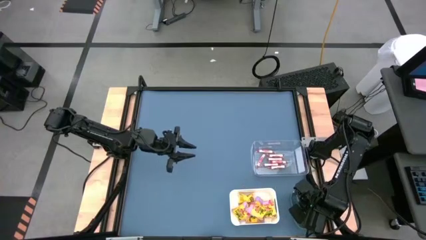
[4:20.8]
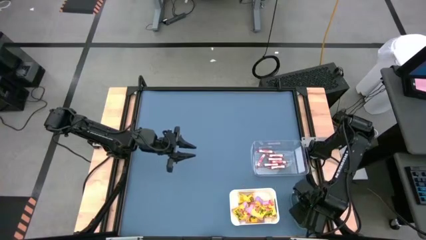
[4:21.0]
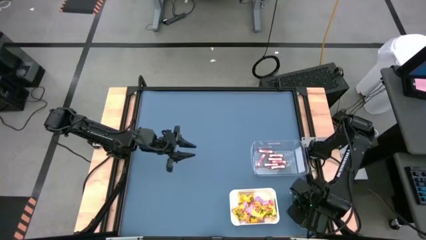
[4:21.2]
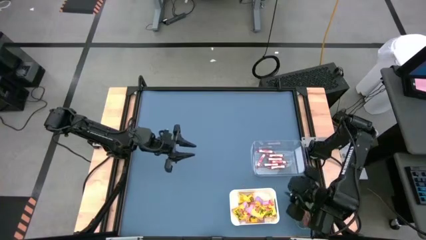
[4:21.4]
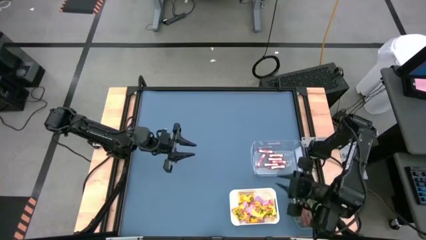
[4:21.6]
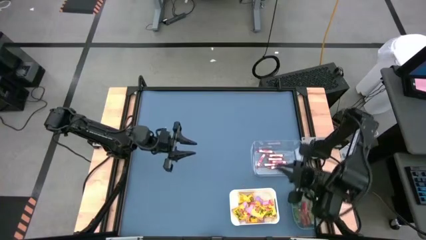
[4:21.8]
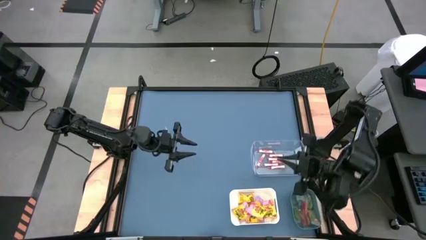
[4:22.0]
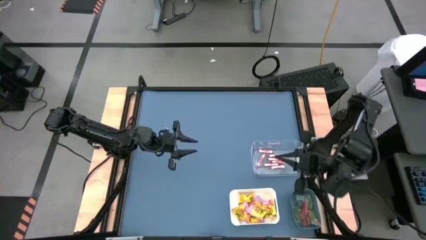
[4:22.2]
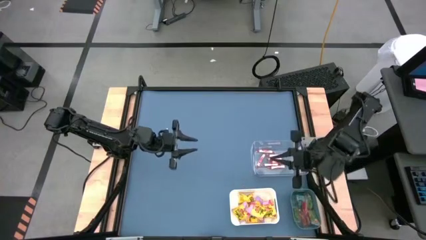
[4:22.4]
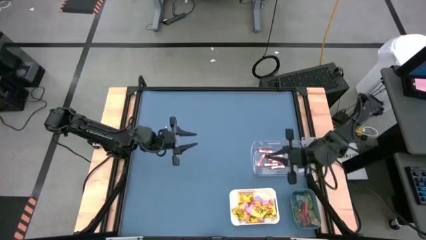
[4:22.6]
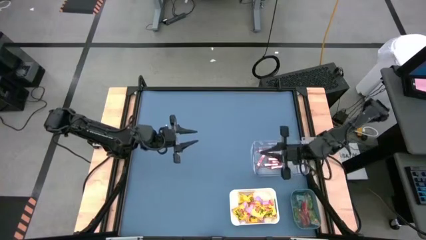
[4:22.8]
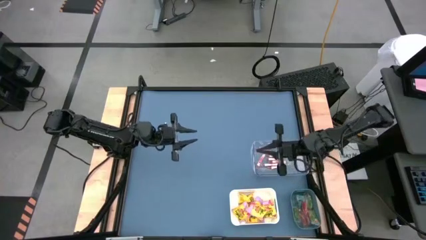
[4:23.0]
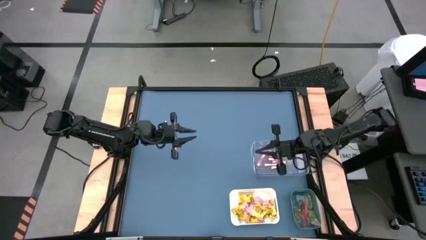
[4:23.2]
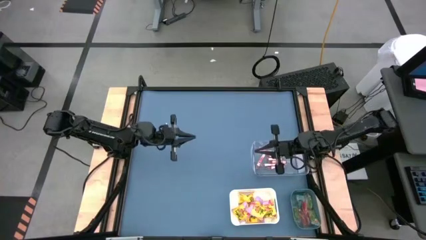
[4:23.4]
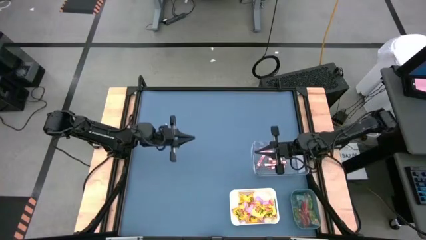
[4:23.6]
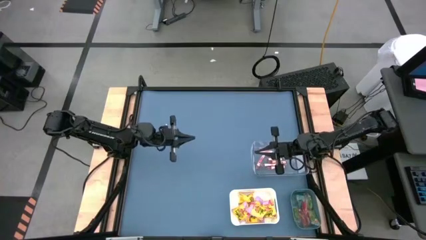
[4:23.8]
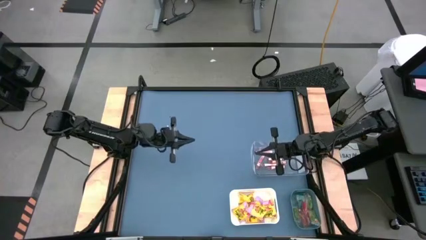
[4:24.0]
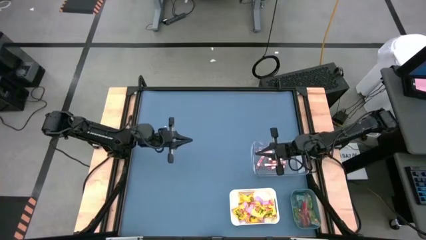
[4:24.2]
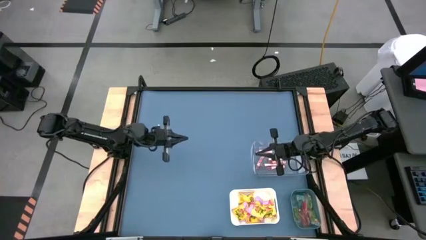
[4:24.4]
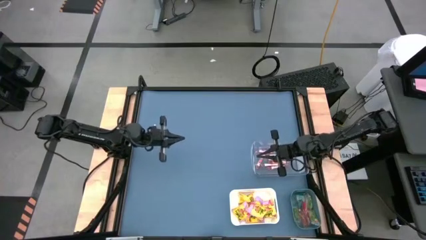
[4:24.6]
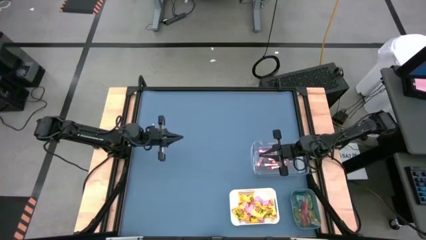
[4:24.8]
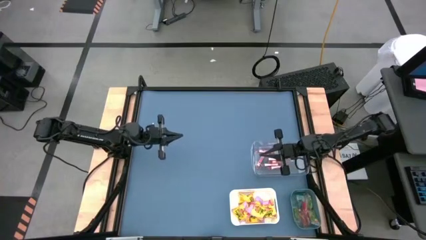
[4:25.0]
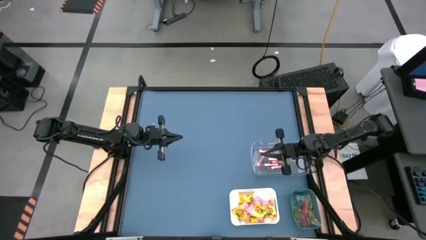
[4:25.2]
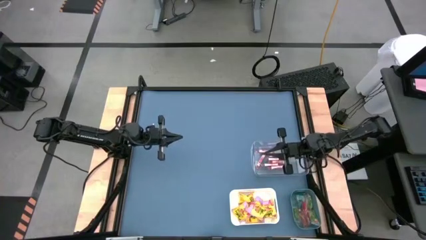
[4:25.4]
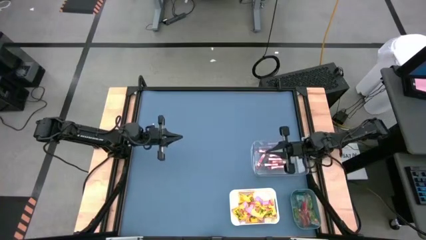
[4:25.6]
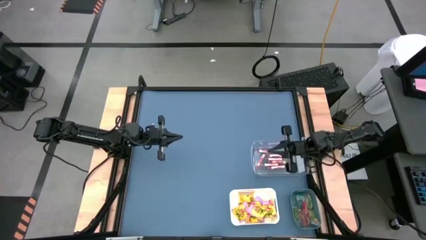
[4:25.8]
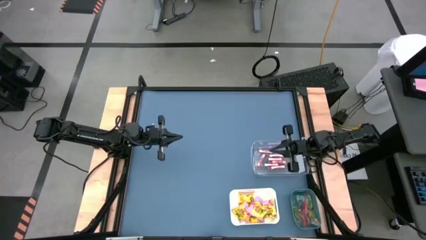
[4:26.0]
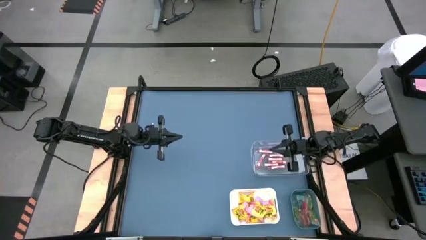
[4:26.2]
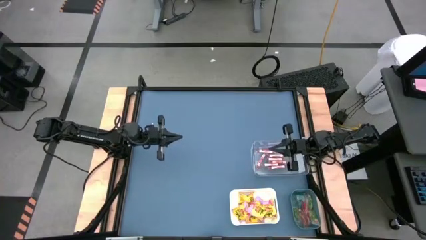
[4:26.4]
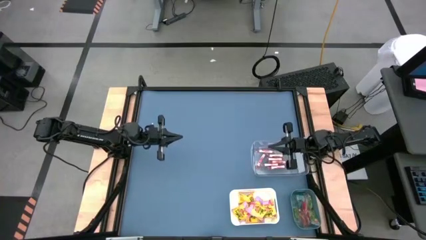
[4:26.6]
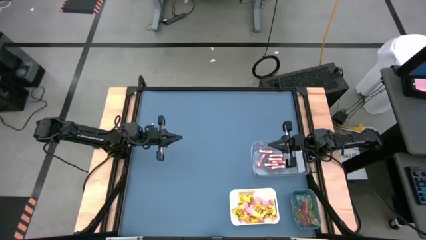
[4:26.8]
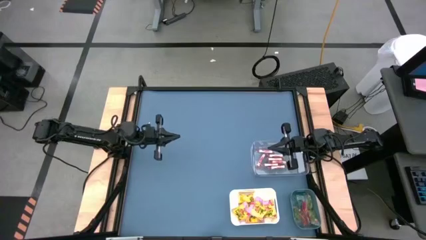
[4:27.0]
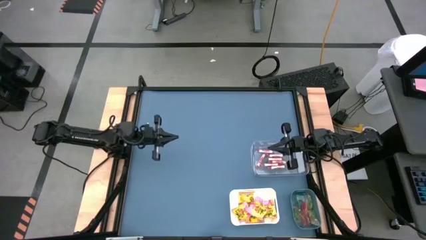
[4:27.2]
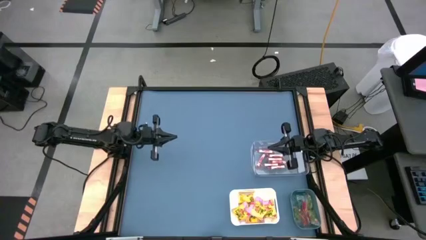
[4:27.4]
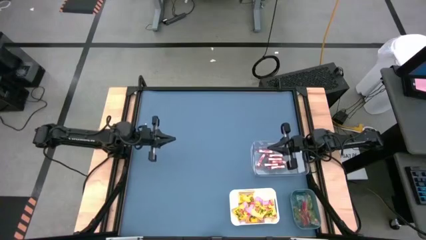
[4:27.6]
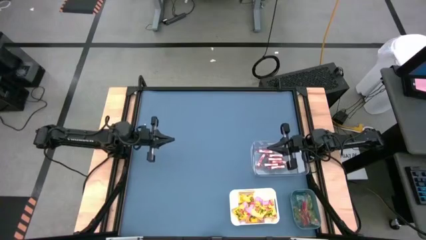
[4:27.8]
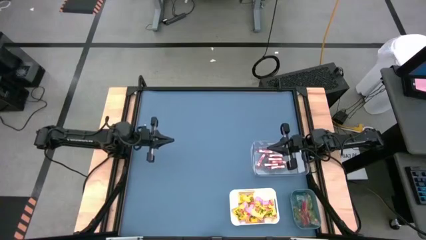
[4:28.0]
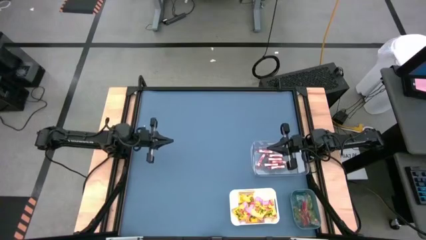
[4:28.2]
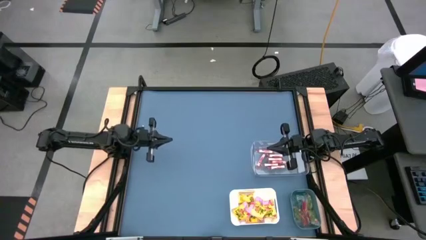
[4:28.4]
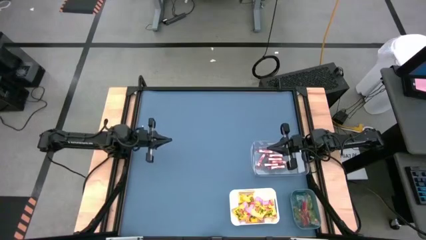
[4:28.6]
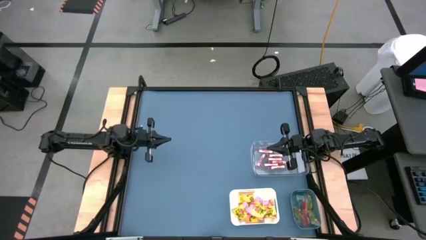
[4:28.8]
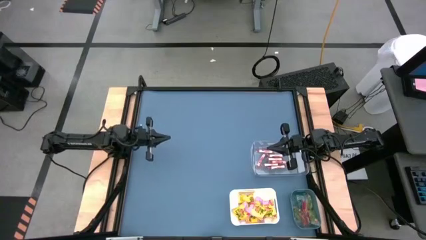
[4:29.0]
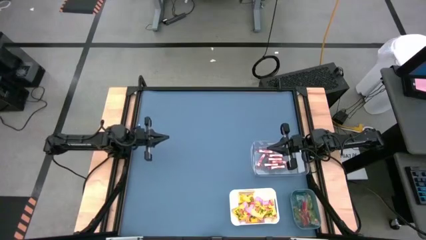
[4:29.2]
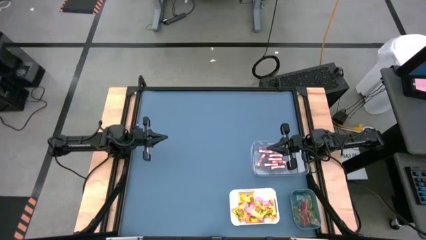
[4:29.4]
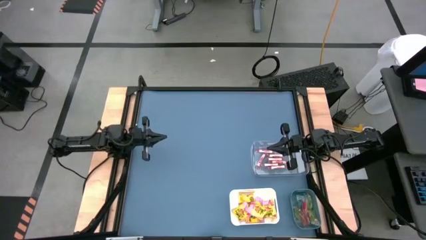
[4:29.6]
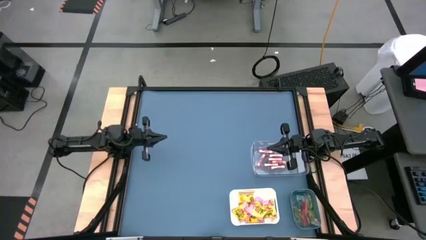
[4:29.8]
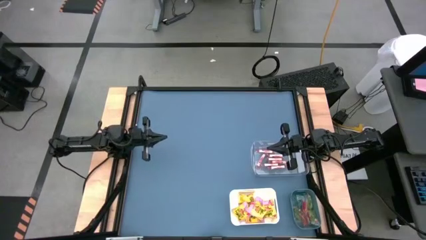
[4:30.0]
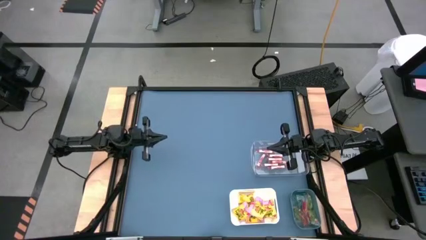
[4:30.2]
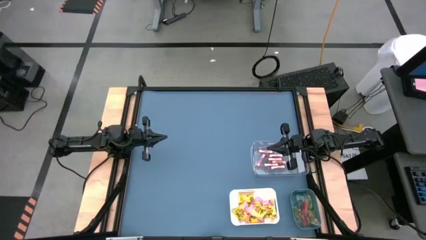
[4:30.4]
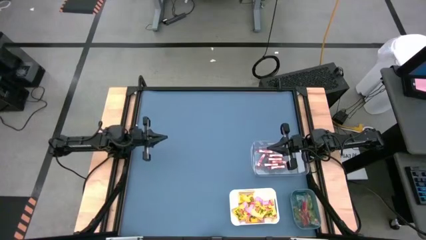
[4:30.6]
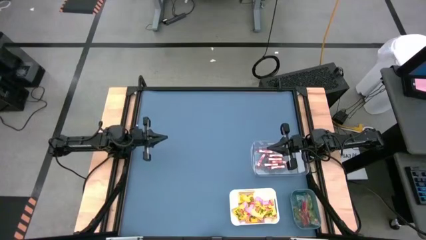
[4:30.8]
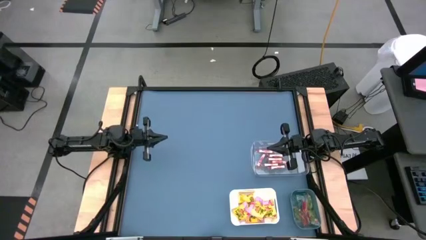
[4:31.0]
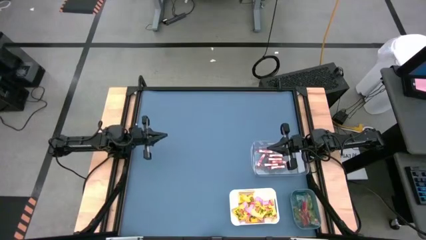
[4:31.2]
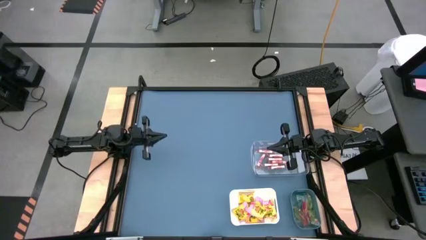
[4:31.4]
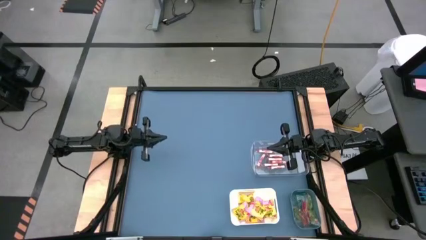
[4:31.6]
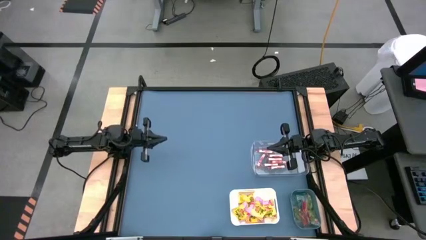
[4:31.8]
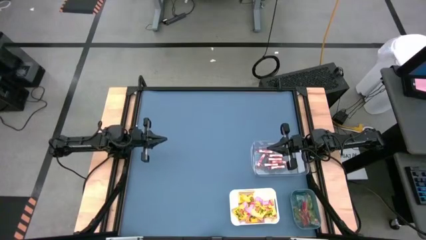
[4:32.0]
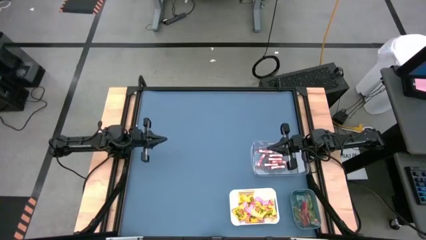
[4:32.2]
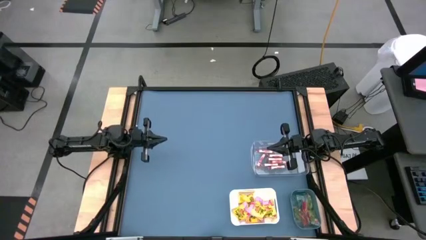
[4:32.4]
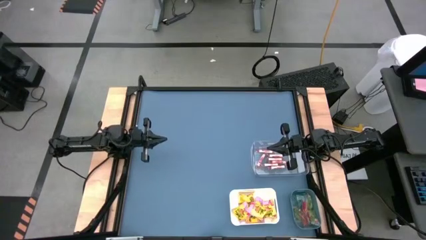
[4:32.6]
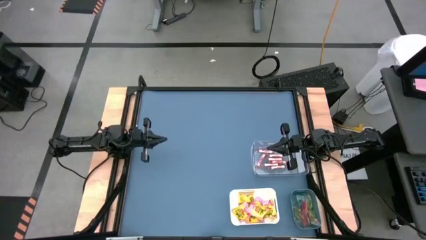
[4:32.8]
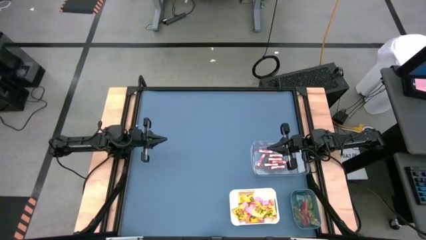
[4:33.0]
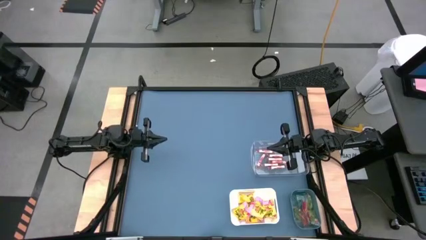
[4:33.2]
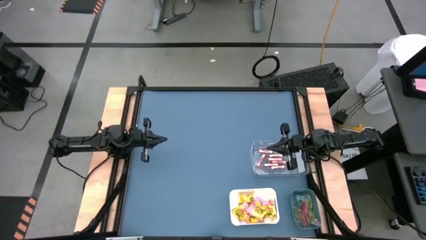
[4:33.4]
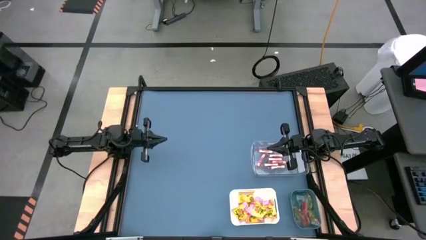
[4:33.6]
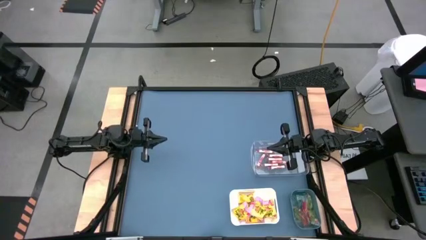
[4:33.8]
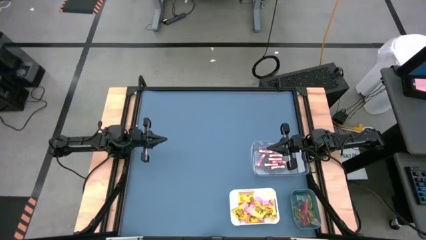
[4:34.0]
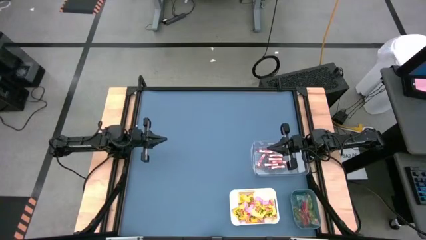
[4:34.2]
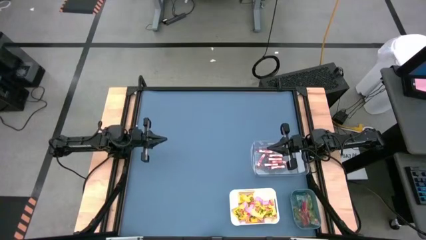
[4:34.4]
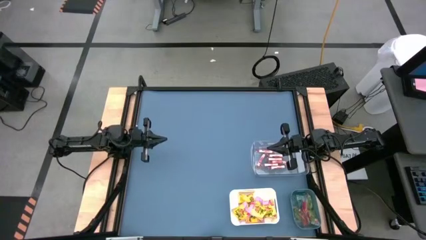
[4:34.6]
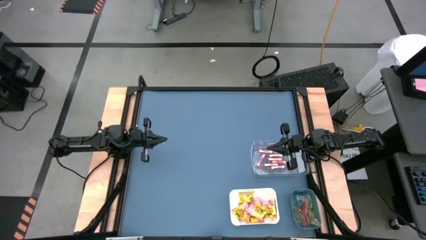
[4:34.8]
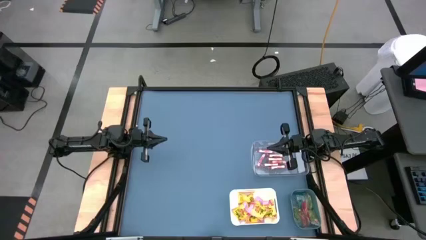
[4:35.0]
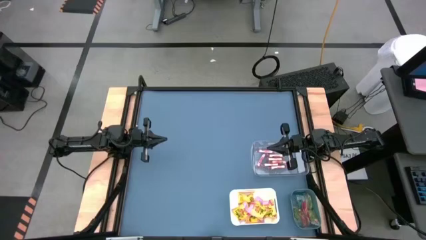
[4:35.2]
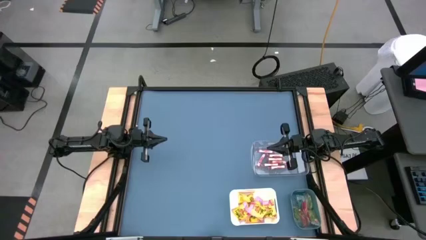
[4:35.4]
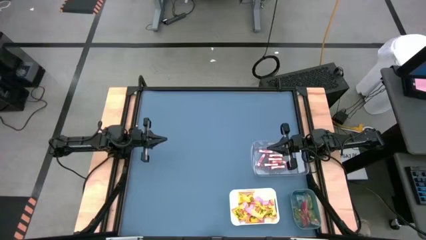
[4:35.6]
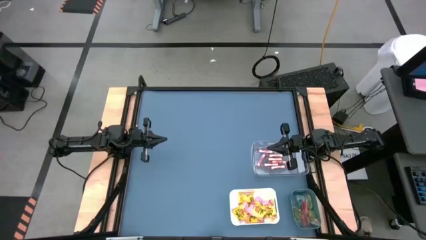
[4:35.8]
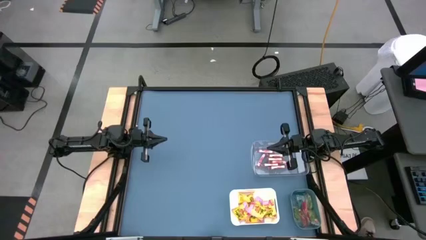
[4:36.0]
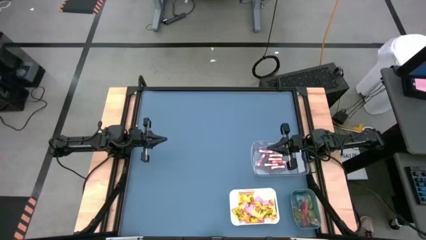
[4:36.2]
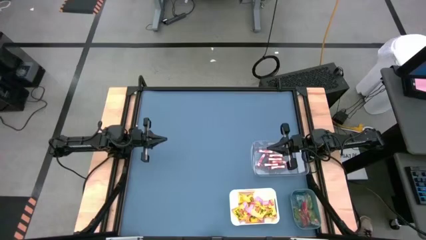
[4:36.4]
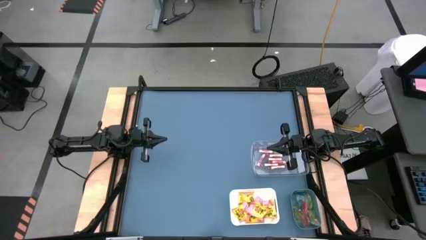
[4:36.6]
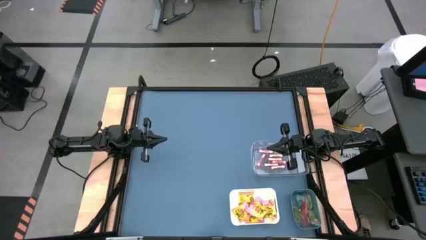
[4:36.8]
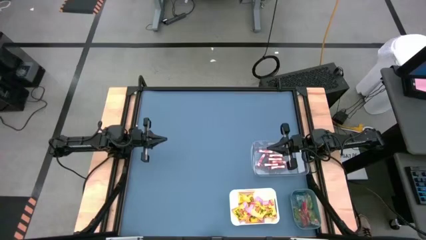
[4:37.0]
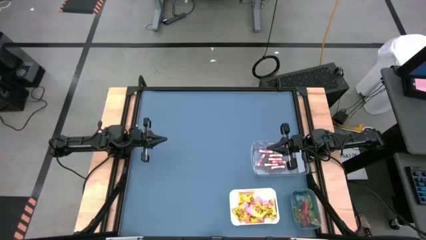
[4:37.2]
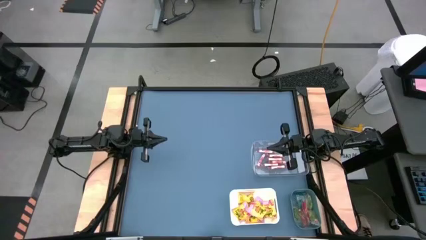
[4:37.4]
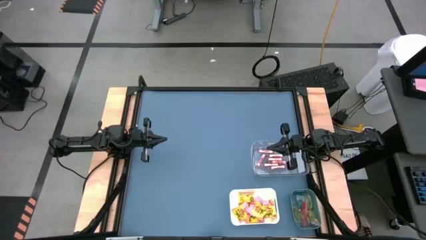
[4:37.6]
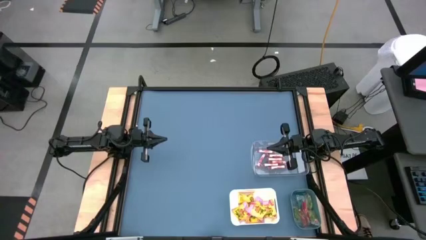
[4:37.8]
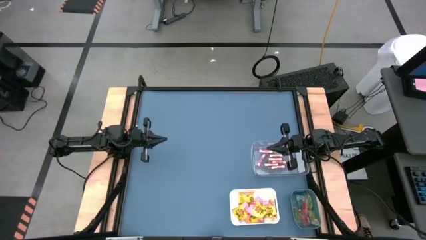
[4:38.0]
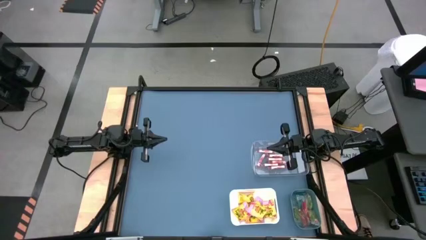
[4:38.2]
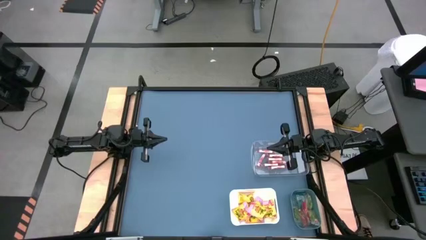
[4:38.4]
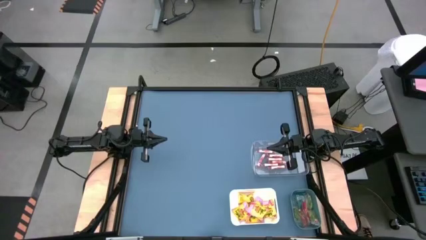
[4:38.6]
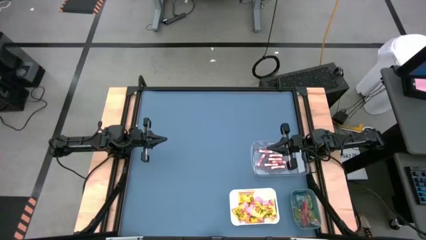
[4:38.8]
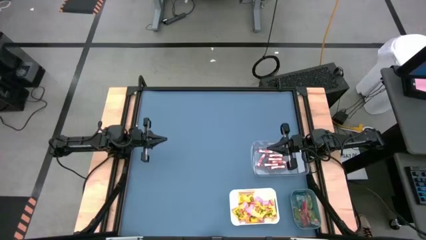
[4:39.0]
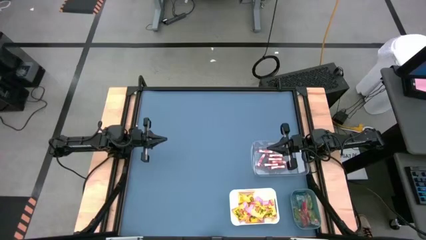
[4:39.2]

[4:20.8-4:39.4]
Task: Sort candy
Return to Home Position
